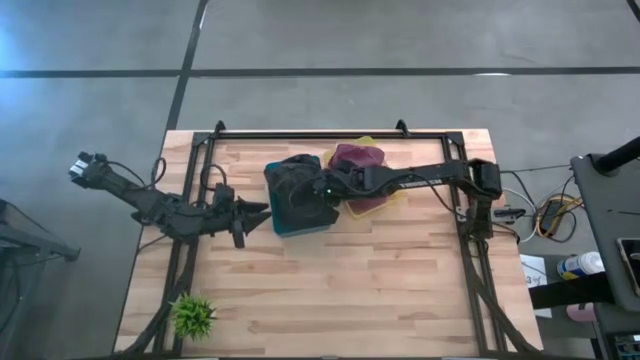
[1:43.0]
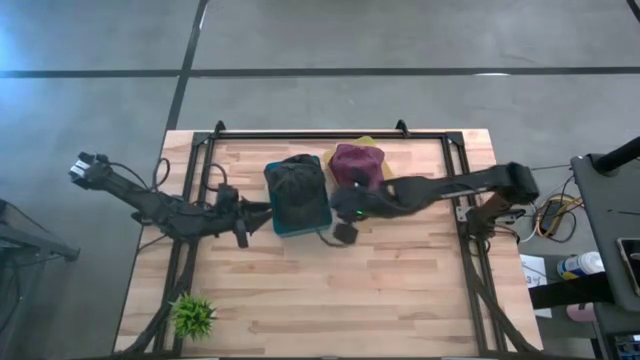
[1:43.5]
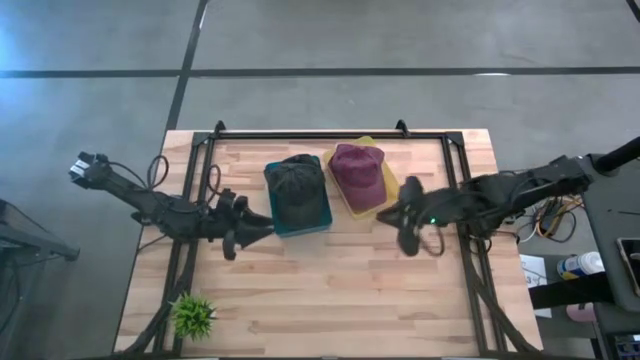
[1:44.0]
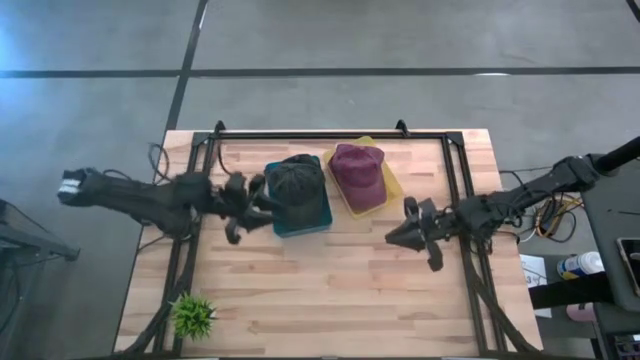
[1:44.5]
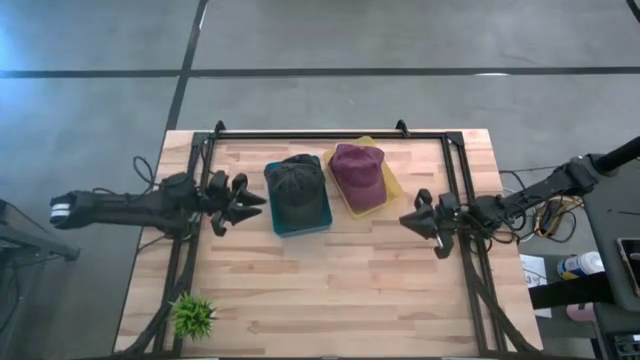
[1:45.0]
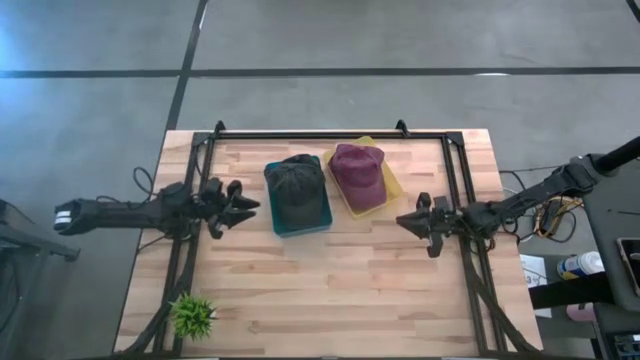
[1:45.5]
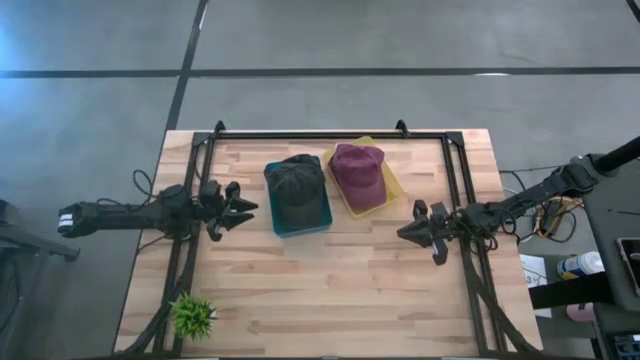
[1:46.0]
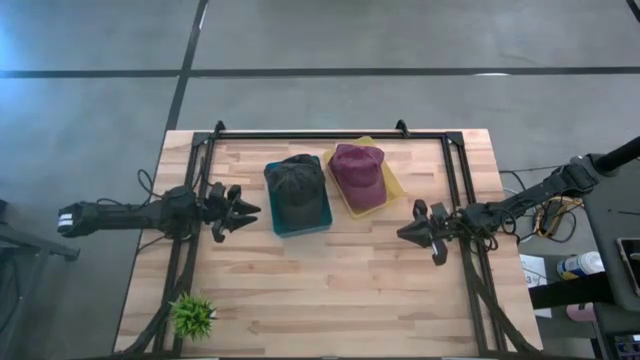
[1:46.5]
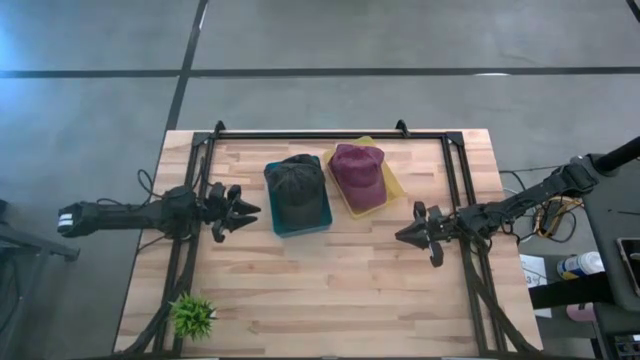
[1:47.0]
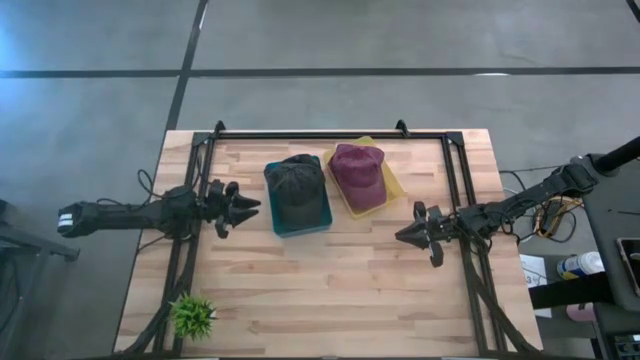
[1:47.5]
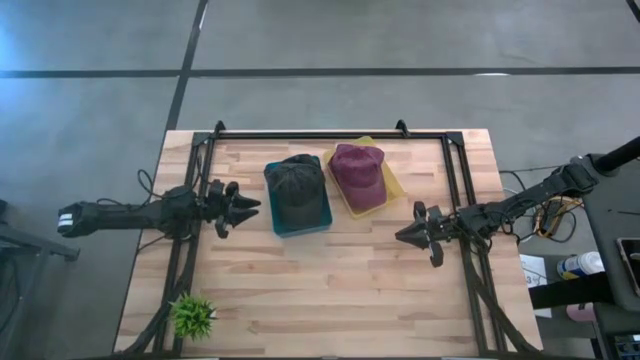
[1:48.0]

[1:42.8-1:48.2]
Task: Pick & Place hat
Return to Home Position
